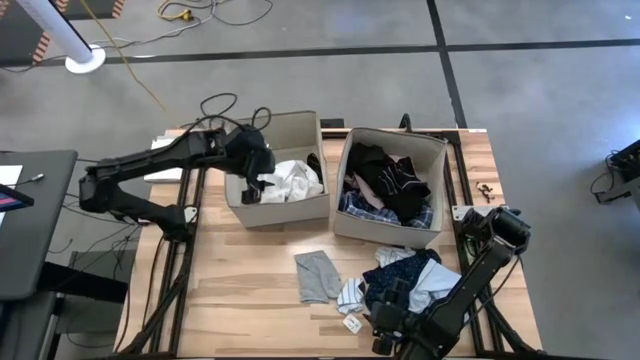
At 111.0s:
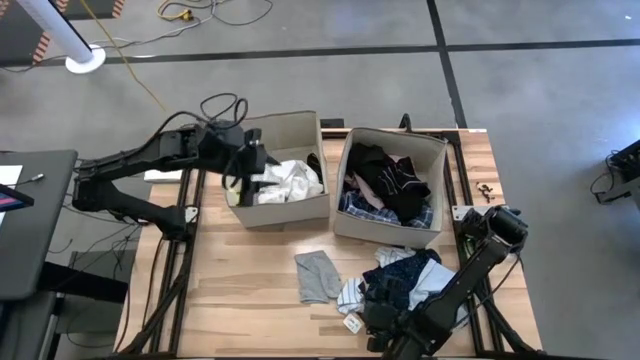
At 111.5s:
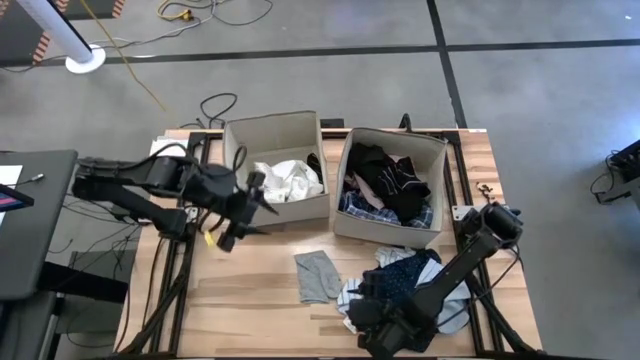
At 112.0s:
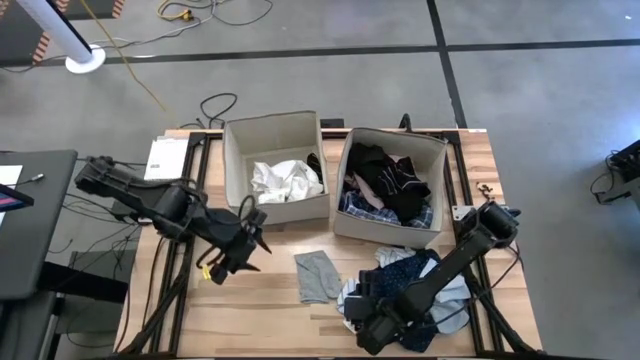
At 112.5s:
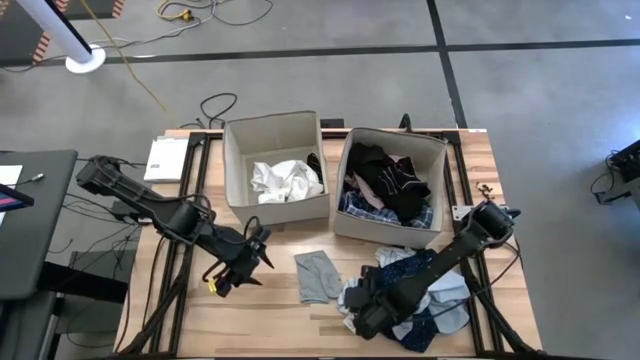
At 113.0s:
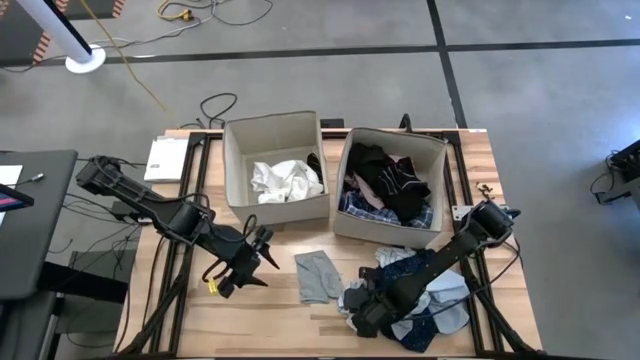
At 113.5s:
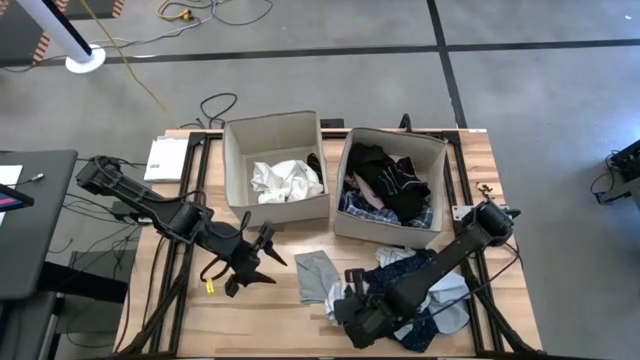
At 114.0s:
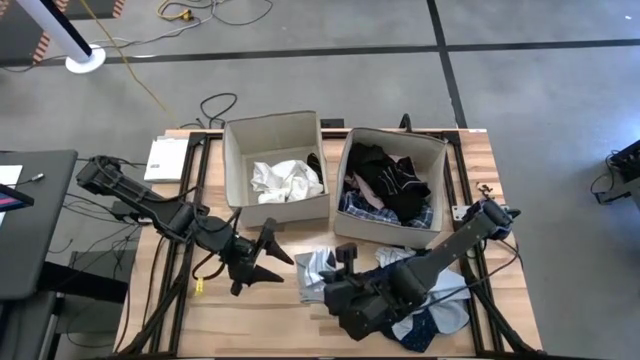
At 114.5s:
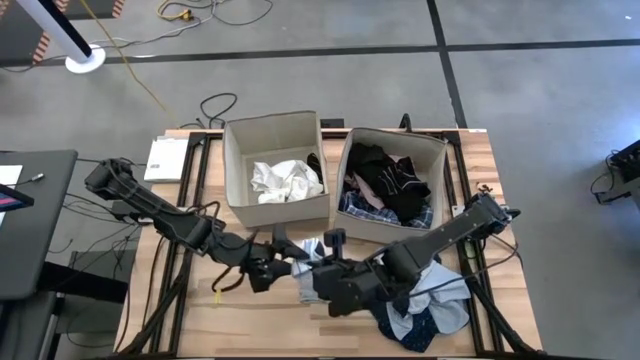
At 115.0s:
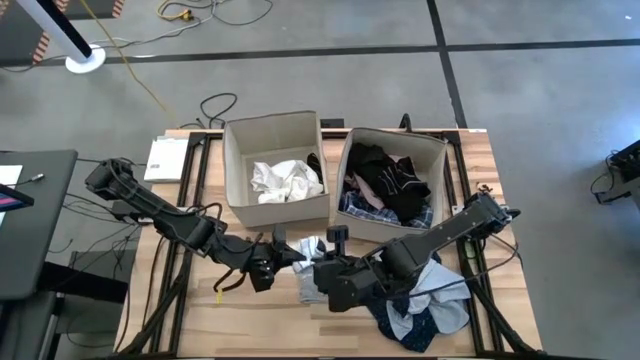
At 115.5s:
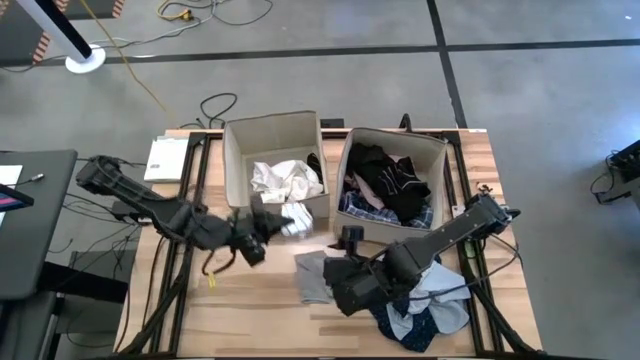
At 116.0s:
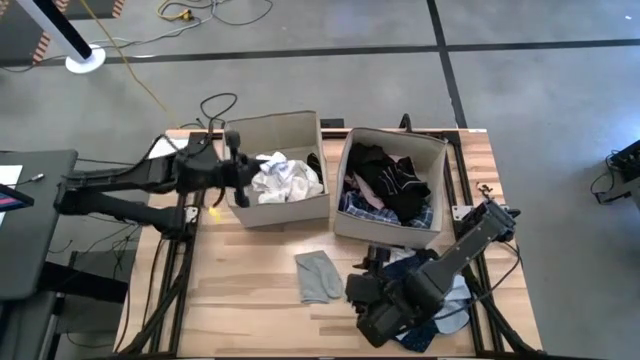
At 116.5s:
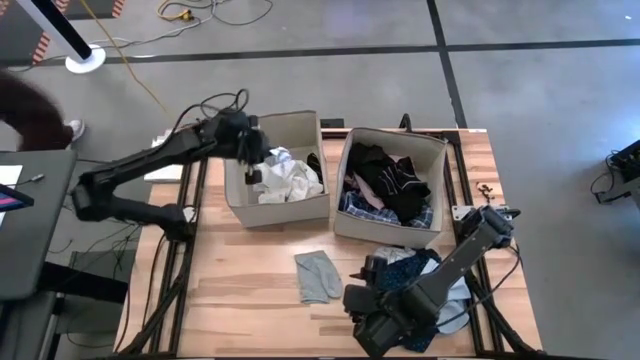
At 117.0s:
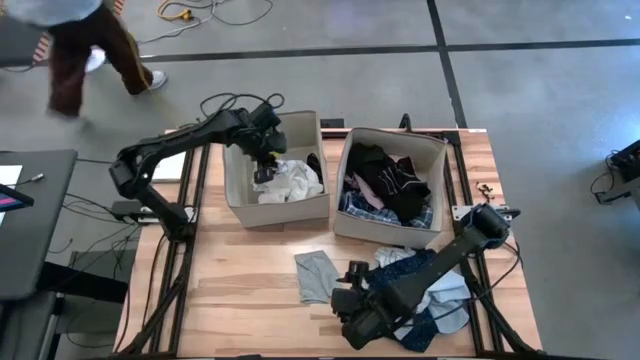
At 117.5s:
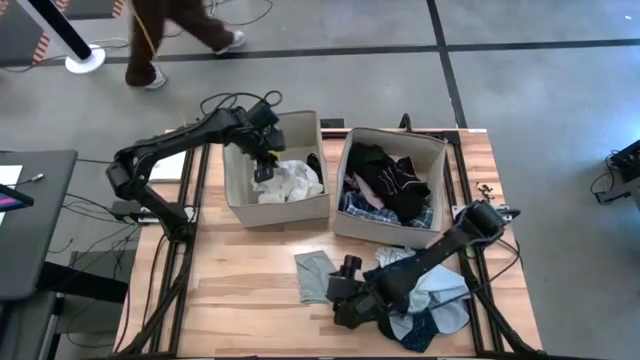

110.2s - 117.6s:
Task: Sort clothes
Put the white sock into the left white laundry bin

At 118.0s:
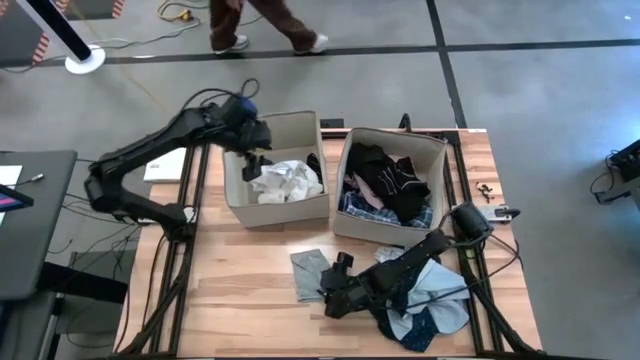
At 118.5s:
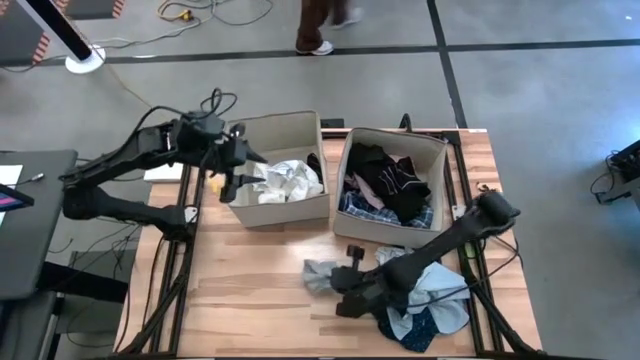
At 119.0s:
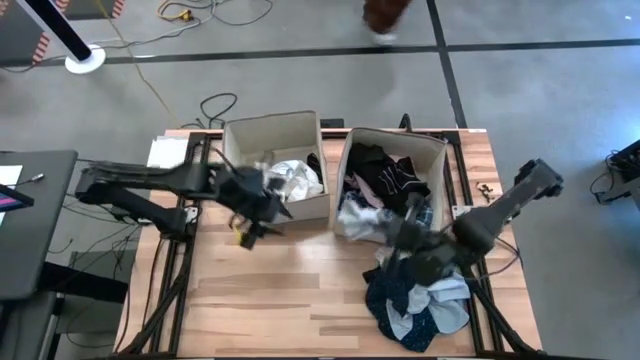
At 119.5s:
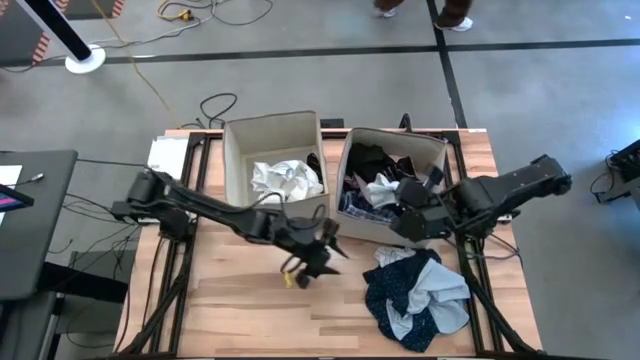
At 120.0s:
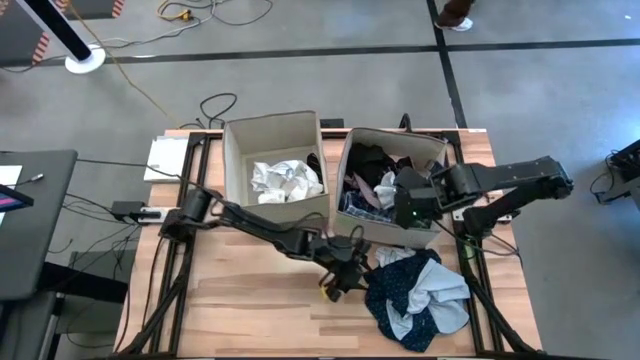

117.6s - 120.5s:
Put the gray sock into the right white laundry bin

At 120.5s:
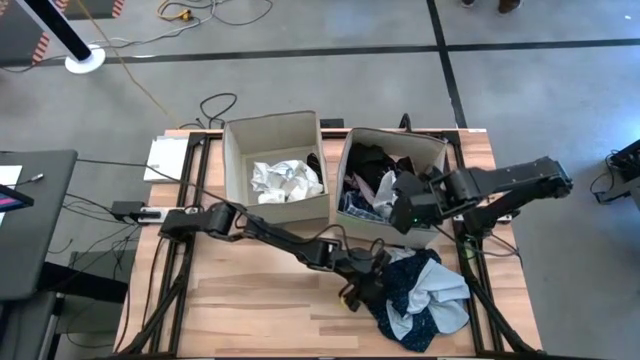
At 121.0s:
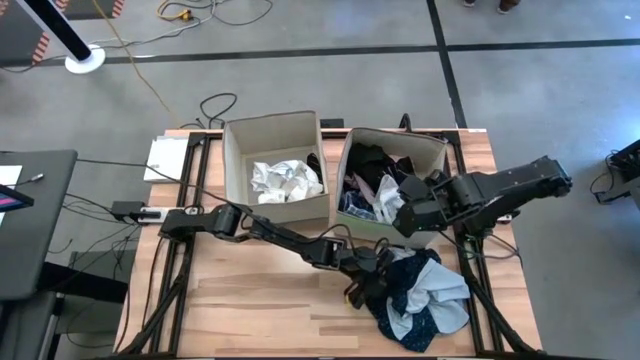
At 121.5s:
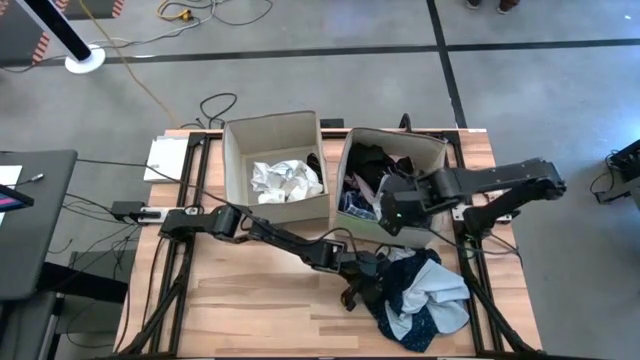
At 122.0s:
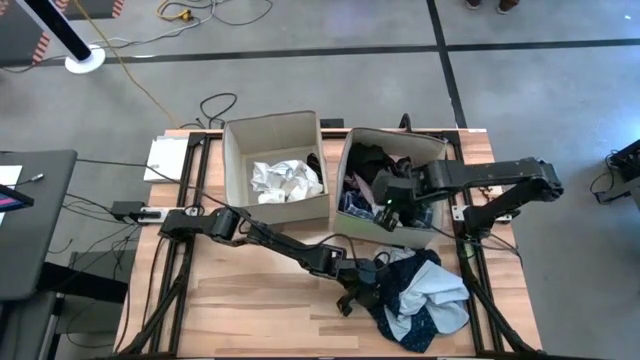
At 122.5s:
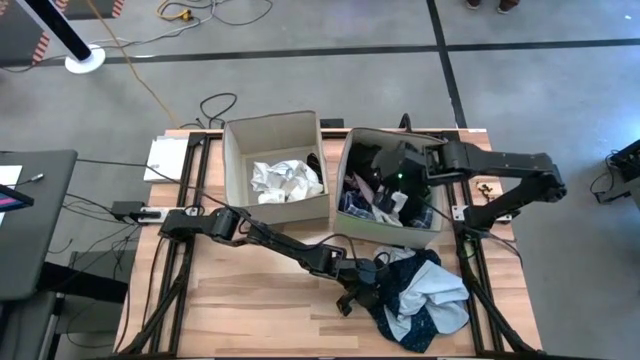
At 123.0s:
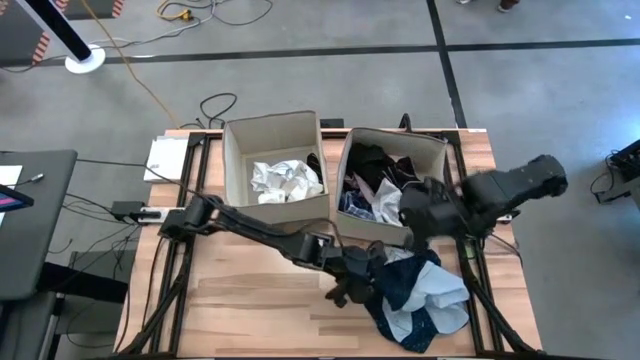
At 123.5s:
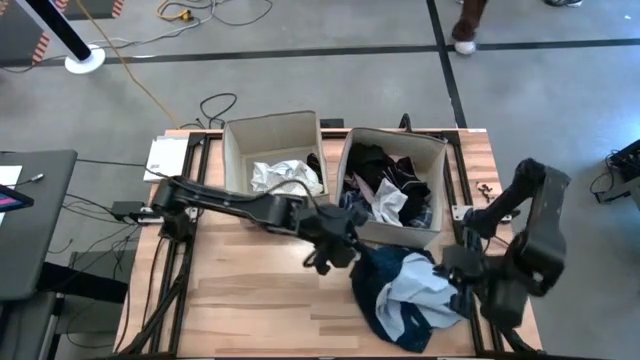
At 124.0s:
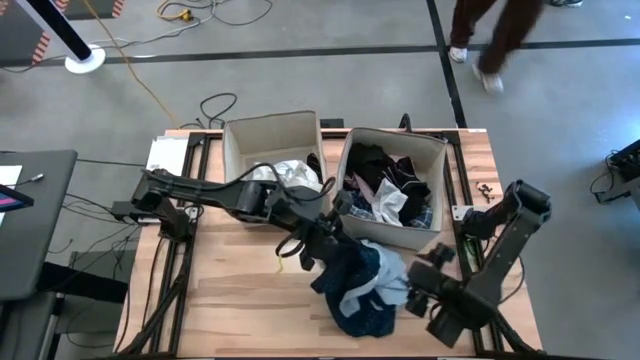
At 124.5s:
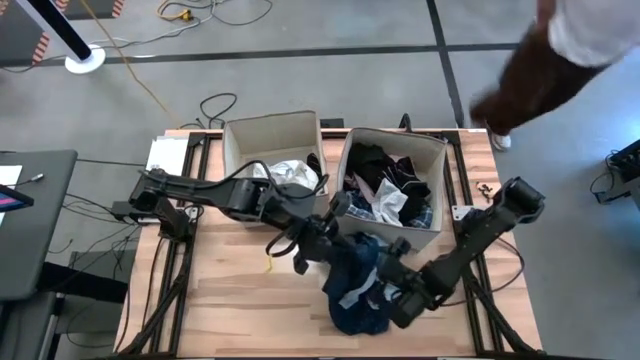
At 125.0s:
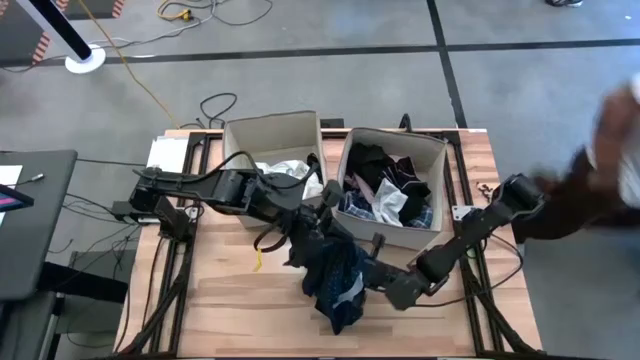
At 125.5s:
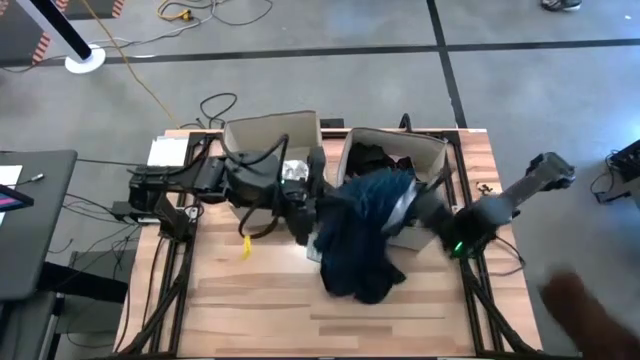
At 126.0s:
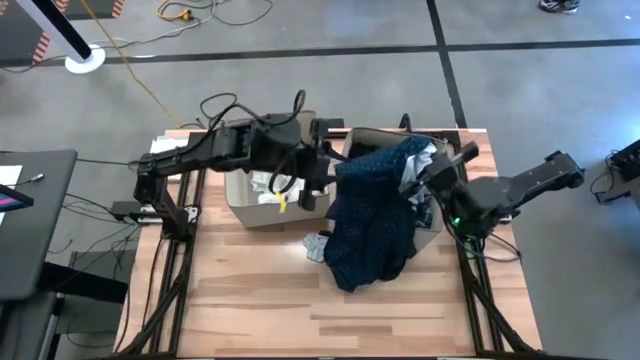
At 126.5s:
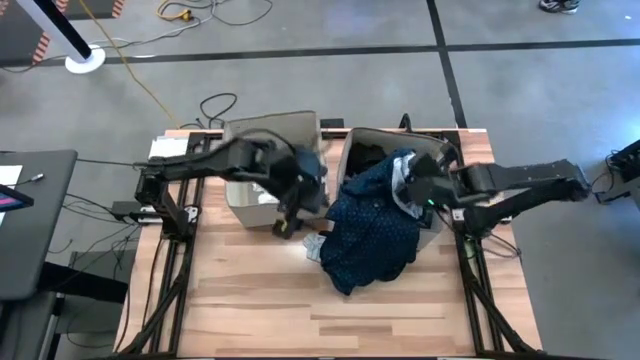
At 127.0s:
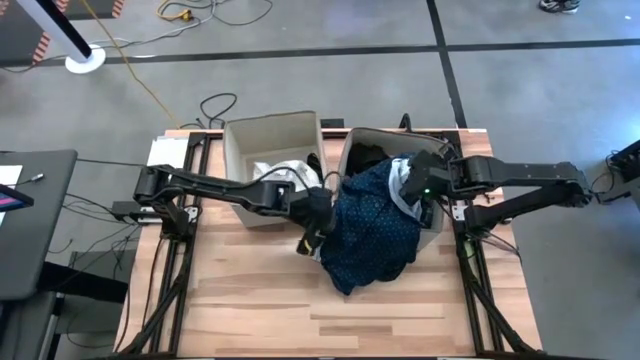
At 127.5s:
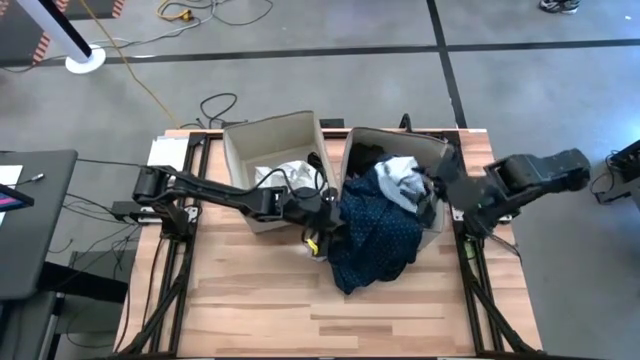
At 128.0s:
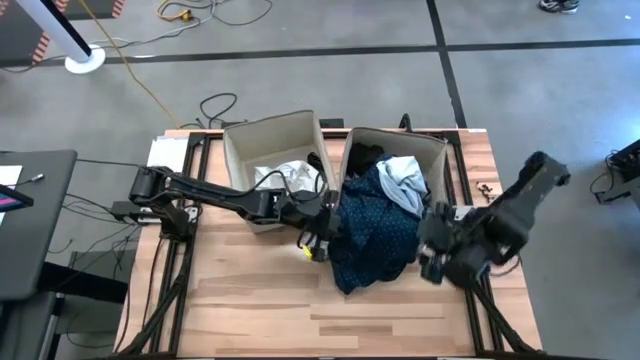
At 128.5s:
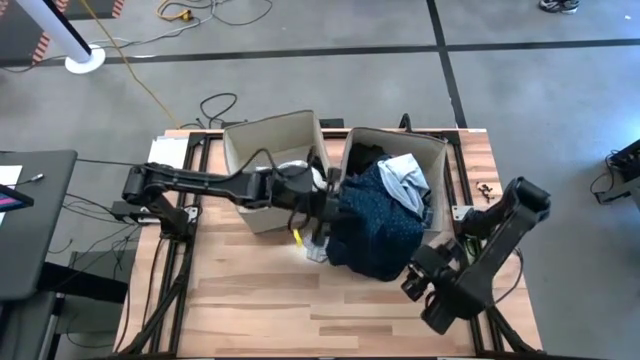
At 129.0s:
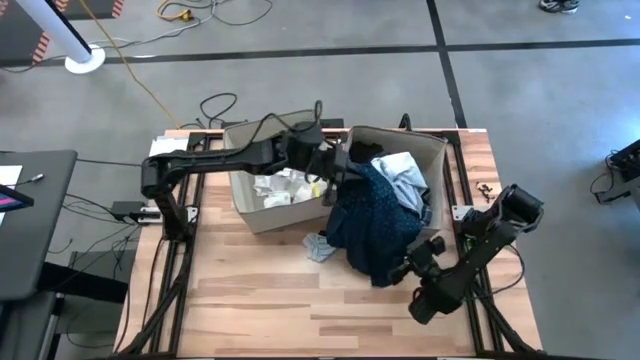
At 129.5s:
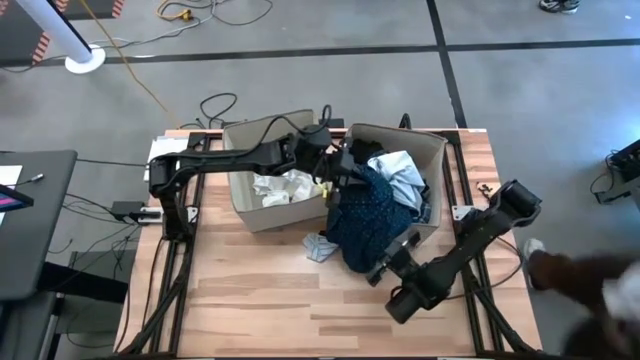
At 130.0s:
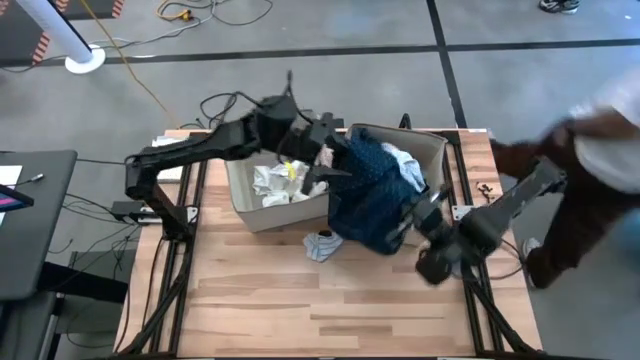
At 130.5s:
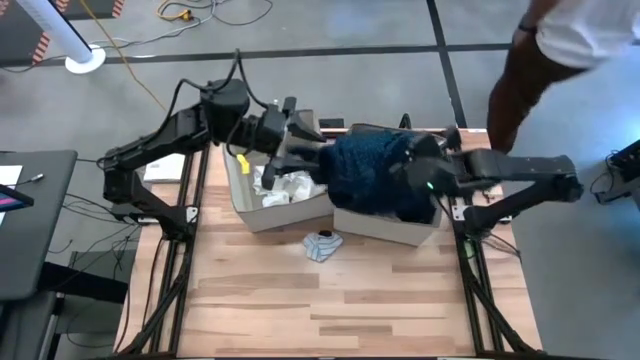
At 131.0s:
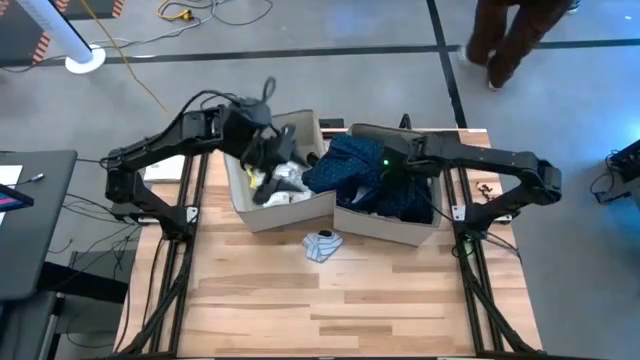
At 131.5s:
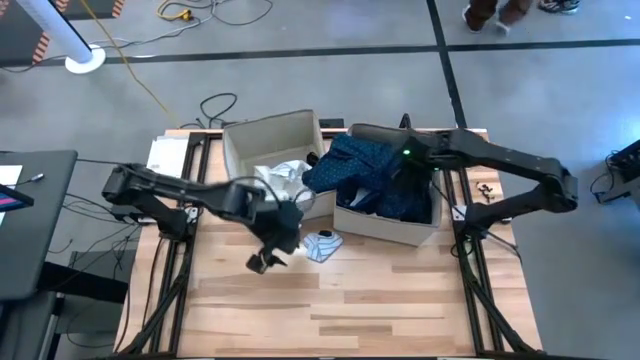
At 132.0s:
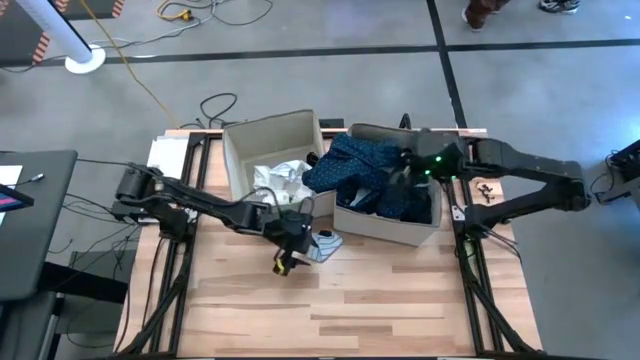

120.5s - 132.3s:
Put the blue sleeved shirt into the right white laundry bin

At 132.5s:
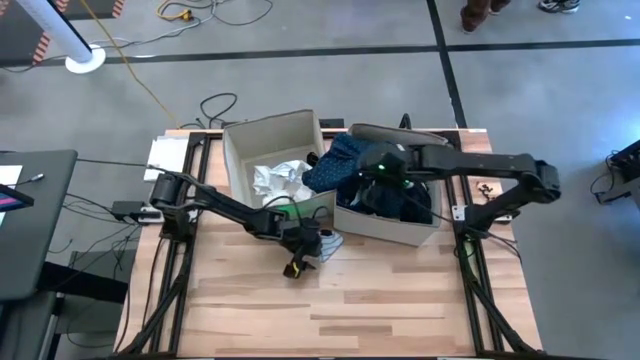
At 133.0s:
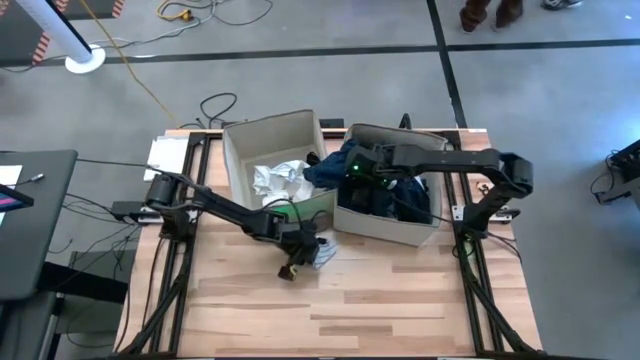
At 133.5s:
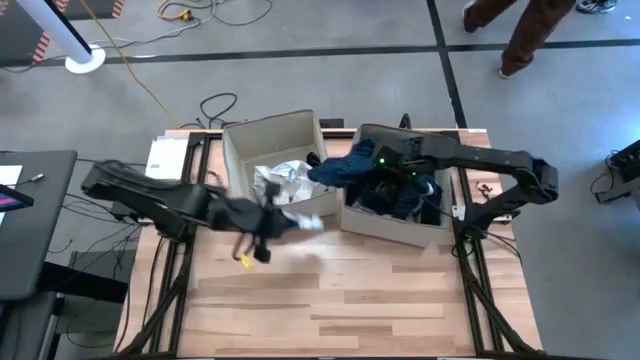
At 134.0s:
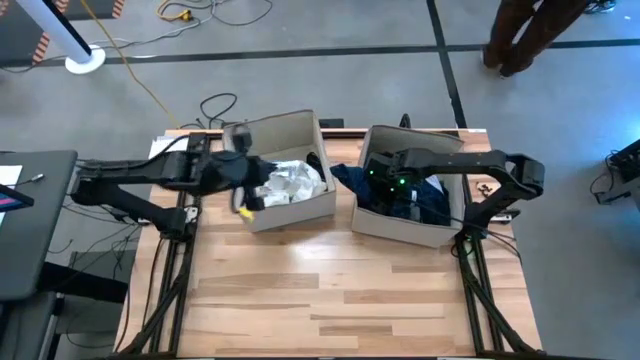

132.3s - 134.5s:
Put the white sock into the left white laundry bin
